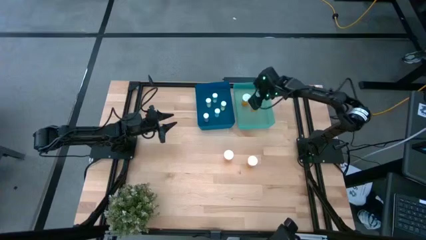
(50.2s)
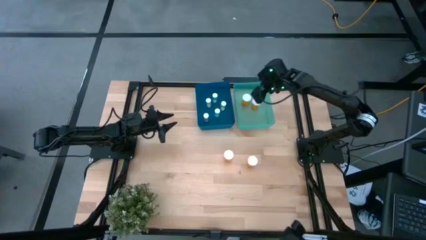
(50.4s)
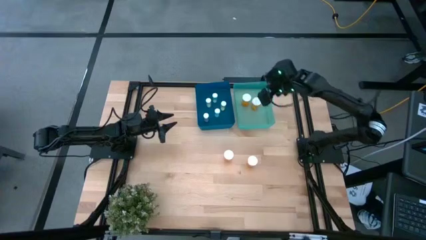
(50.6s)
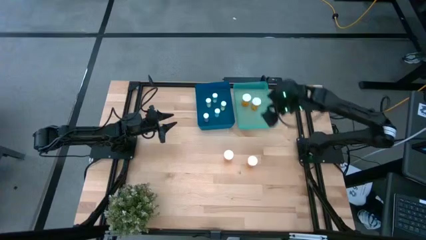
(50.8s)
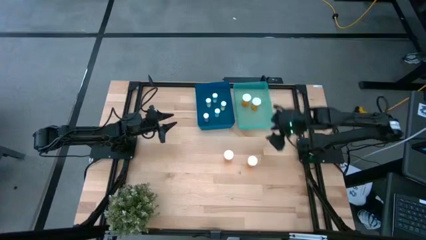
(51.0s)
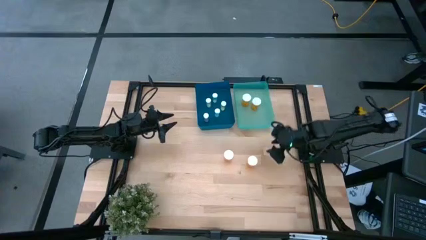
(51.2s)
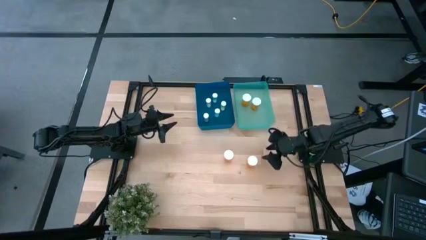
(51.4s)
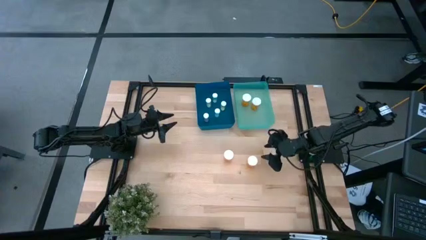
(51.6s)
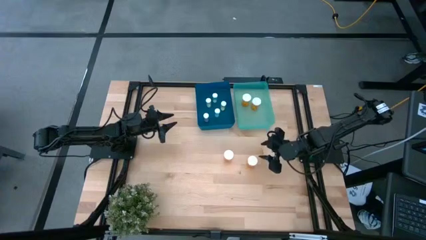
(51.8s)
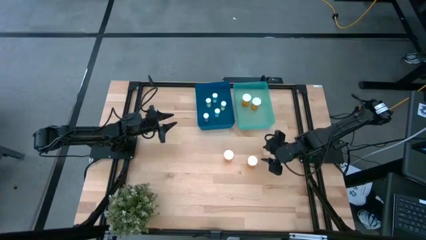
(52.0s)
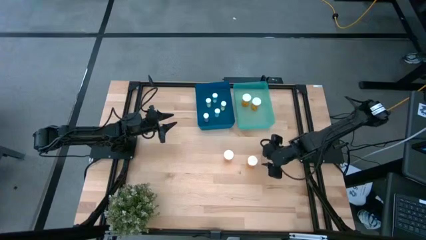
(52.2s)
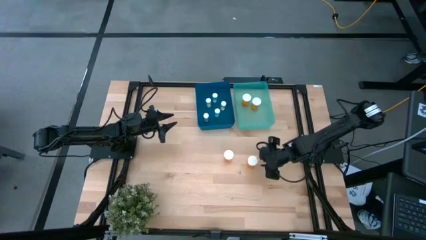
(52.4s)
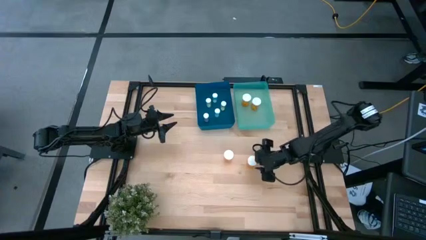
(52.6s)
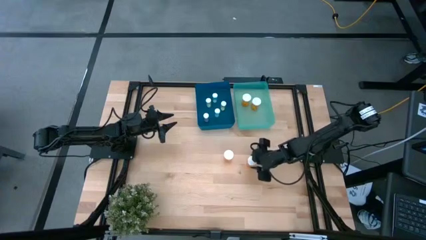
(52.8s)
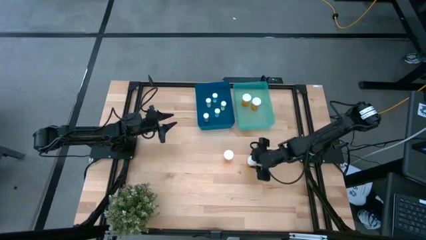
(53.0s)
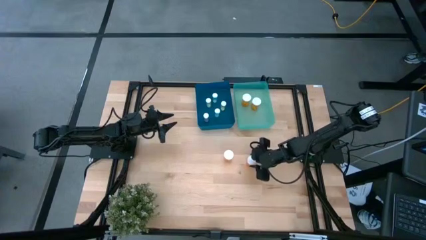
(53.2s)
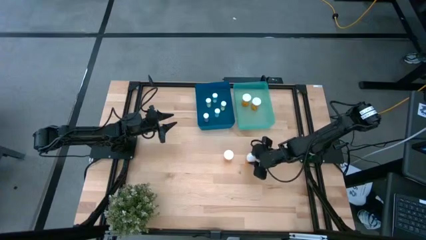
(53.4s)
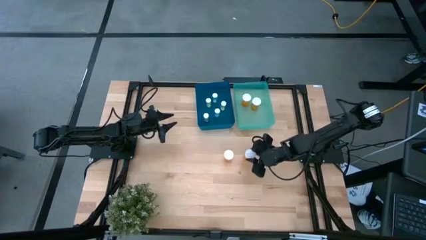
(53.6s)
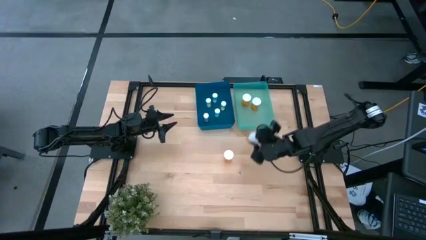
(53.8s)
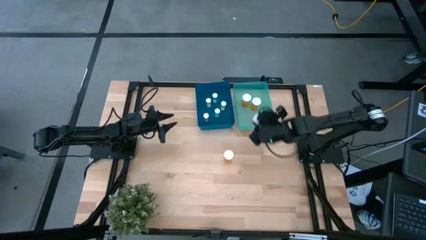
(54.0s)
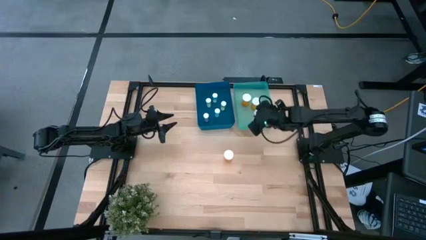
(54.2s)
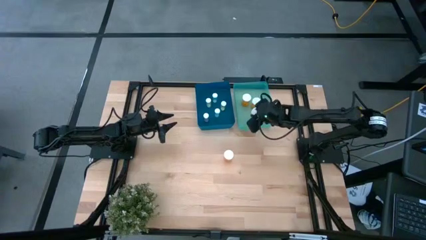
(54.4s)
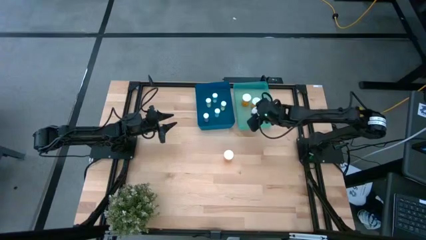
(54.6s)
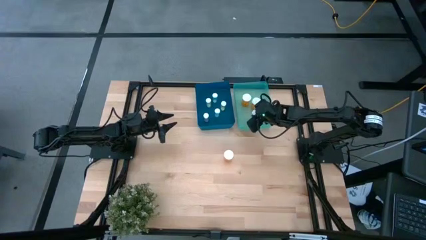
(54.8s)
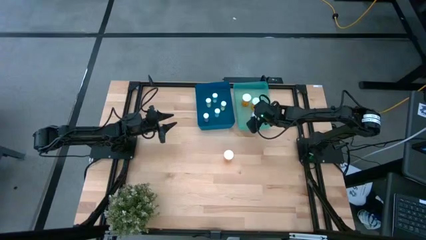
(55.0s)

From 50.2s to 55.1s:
Task: Pick and place medicine bottles into bin by pill shape (circle, oval)
Put the orange pill bottle on the green bin

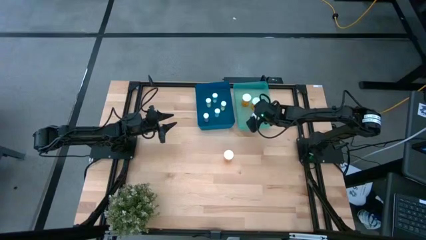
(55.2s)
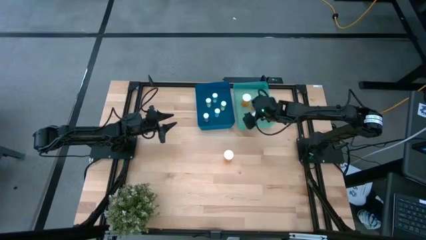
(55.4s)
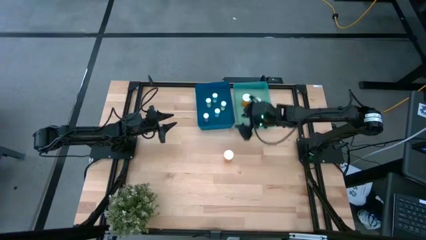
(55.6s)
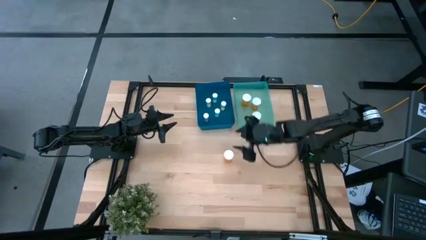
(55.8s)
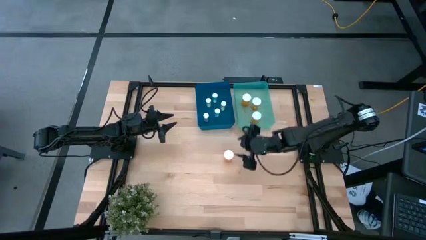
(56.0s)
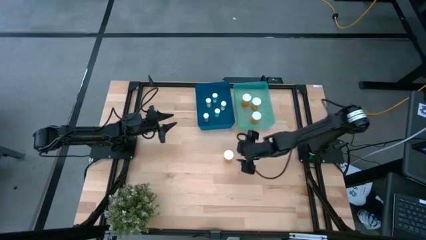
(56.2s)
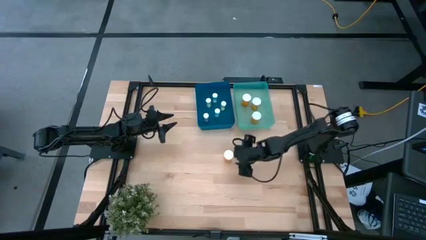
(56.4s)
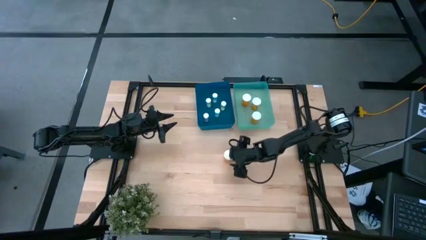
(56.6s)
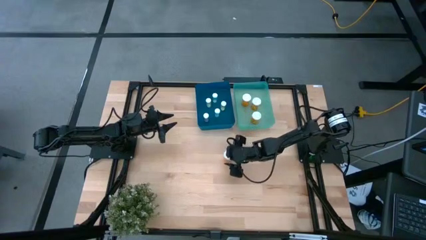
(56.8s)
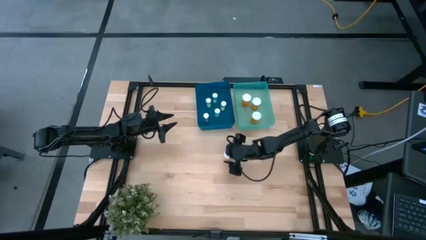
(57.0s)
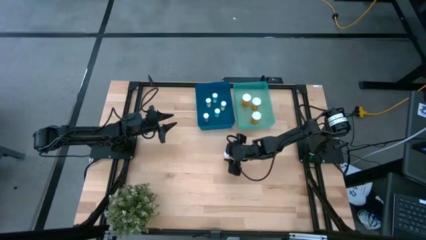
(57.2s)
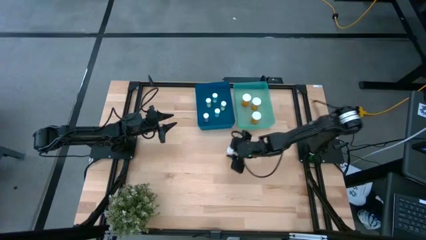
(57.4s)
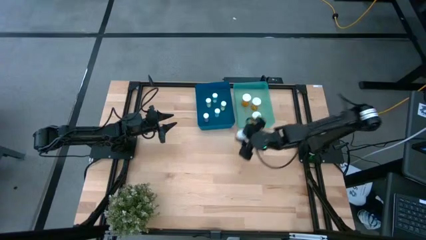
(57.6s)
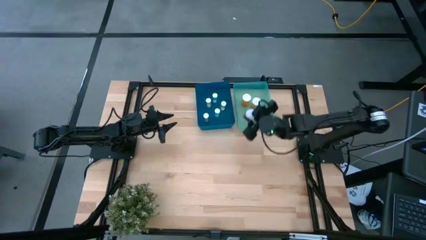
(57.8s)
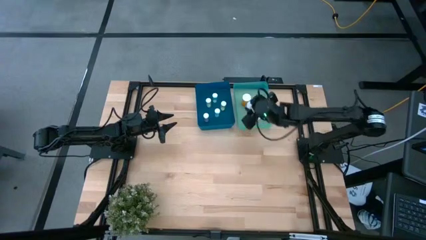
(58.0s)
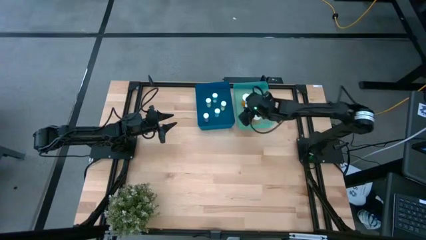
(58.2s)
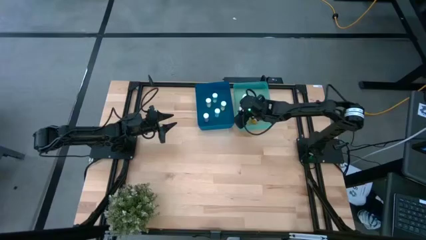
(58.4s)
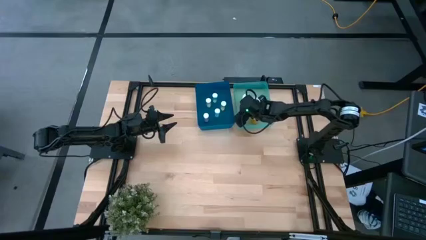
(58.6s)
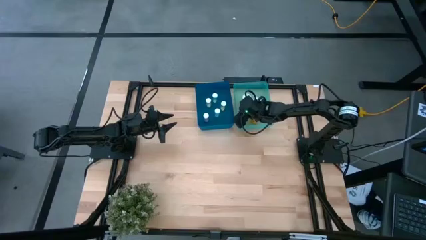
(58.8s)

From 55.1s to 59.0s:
Put the orange pill bottle on the green bin

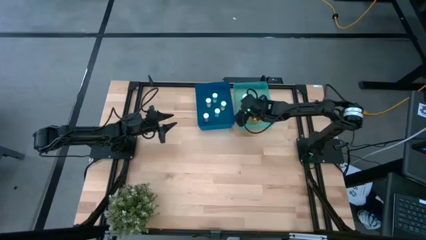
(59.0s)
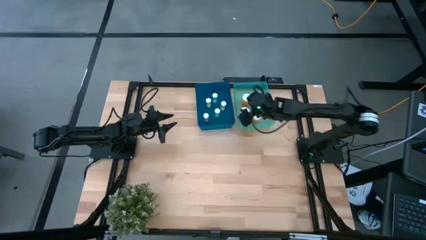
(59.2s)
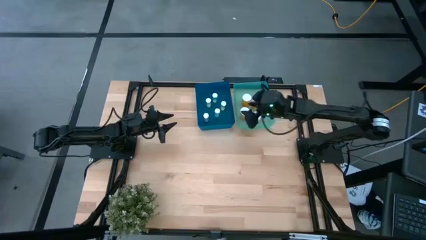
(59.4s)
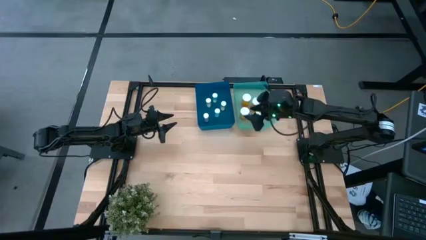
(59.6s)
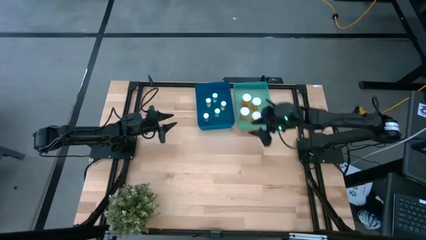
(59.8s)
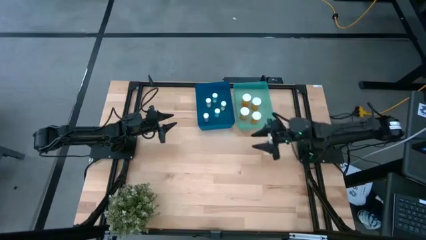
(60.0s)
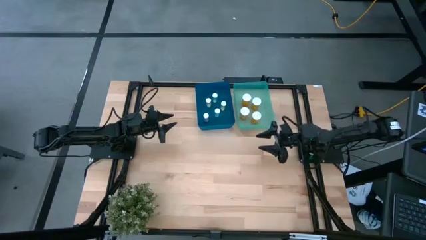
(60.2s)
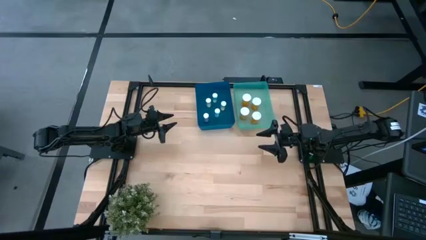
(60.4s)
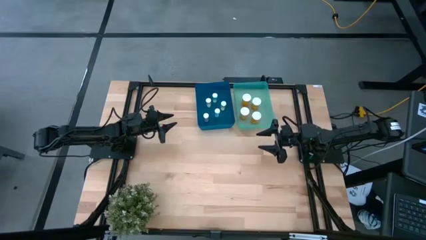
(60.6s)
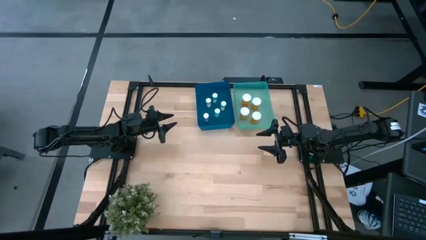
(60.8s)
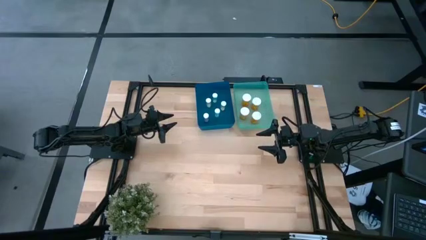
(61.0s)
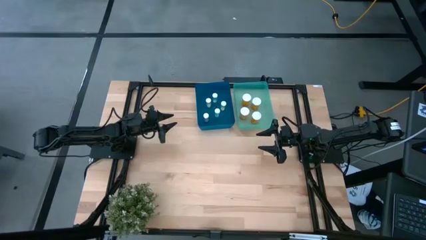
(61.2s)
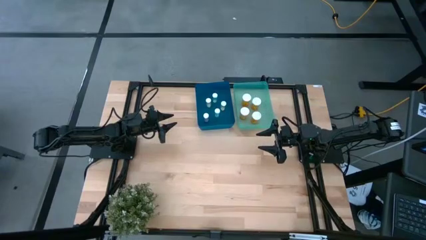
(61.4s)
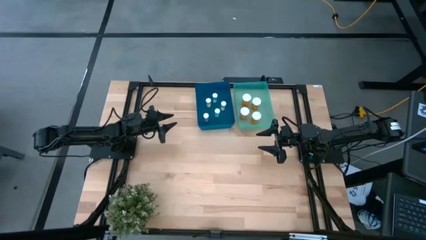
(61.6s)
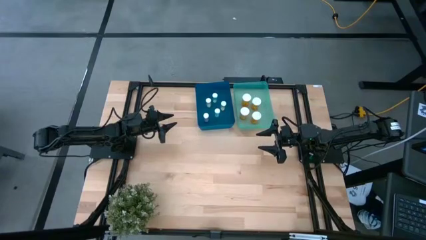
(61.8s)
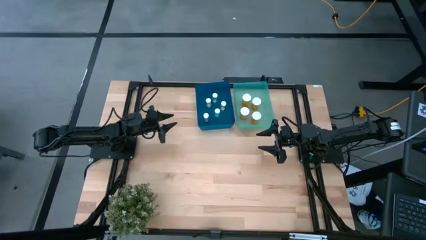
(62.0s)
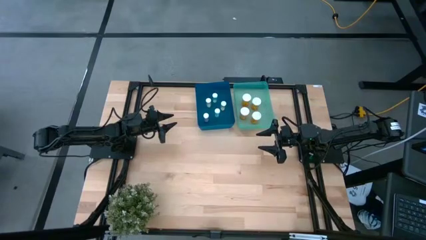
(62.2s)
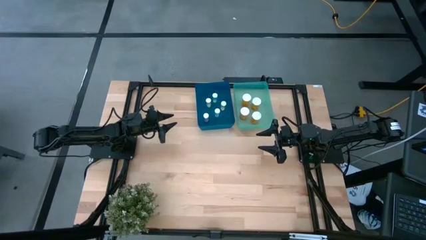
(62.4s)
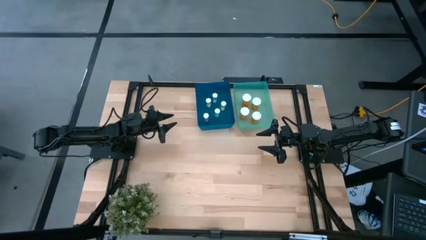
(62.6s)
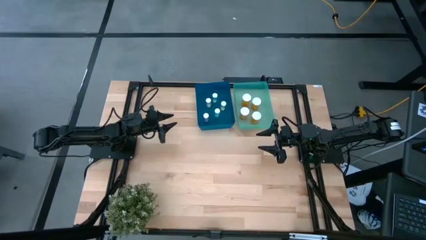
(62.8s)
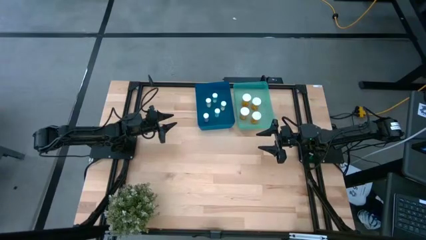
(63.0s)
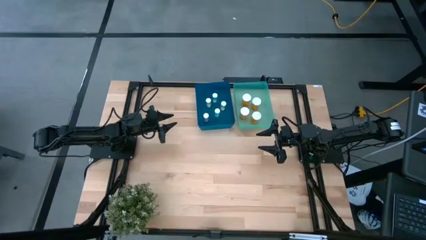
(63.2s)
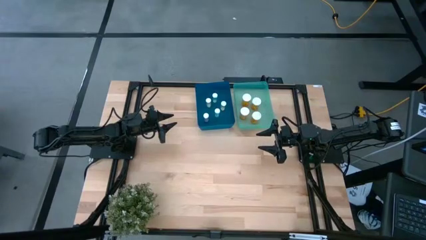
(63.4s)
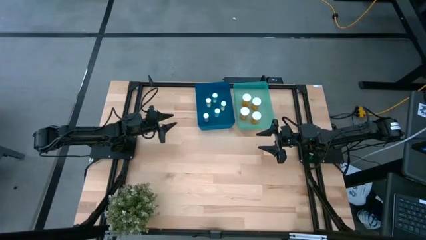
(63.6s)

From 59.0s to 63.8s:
Return to Home Position

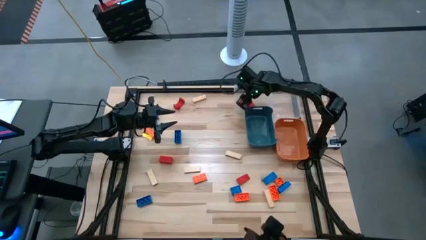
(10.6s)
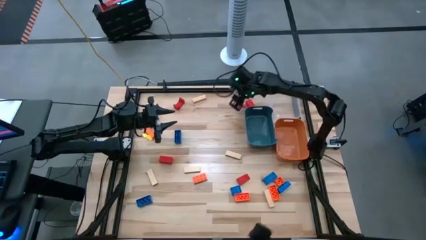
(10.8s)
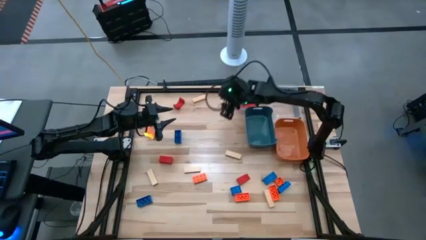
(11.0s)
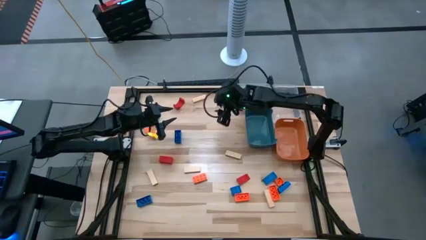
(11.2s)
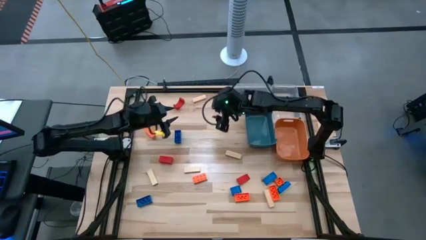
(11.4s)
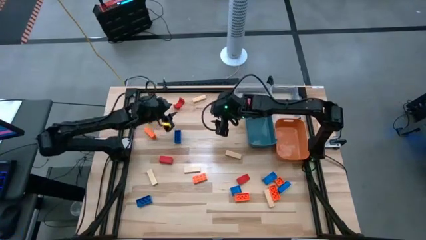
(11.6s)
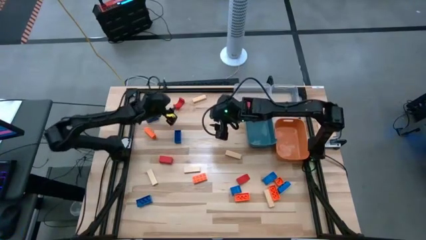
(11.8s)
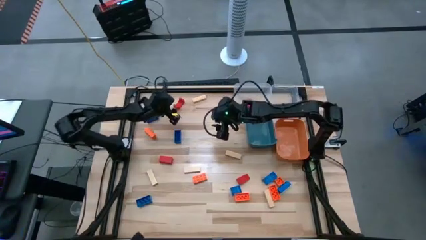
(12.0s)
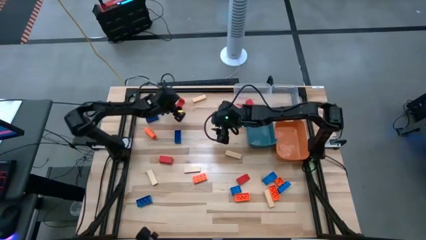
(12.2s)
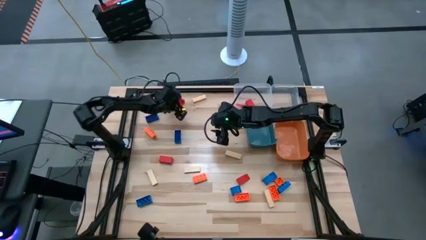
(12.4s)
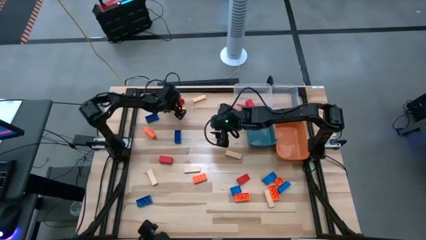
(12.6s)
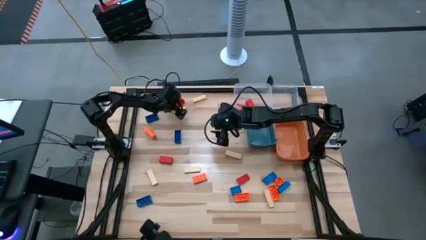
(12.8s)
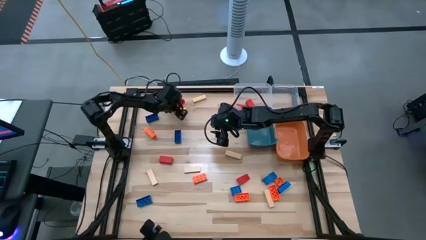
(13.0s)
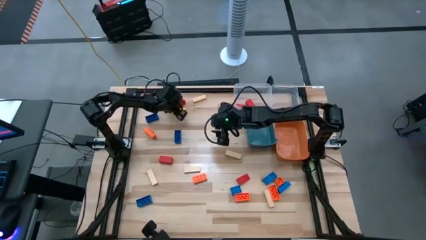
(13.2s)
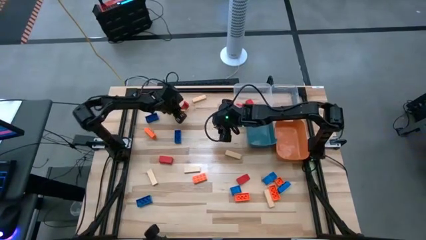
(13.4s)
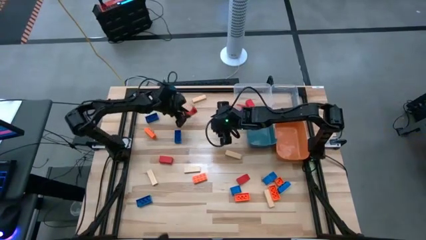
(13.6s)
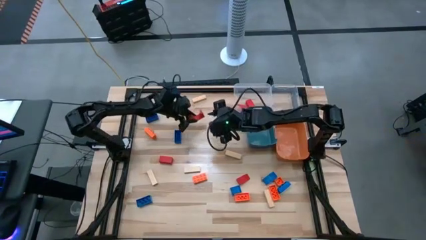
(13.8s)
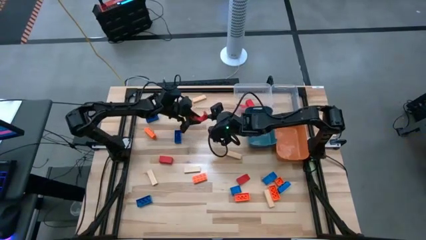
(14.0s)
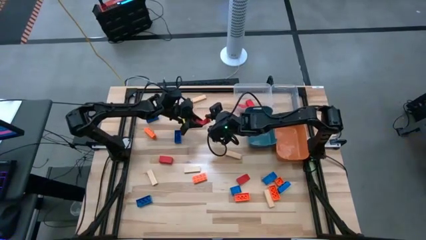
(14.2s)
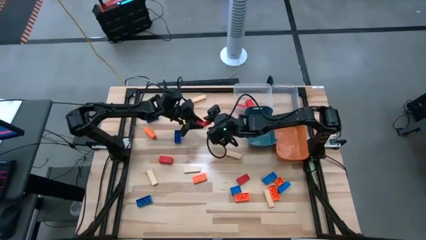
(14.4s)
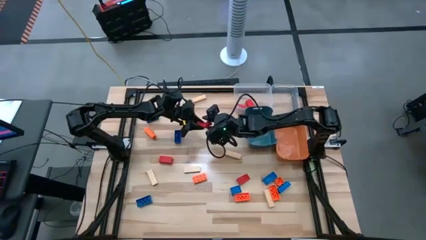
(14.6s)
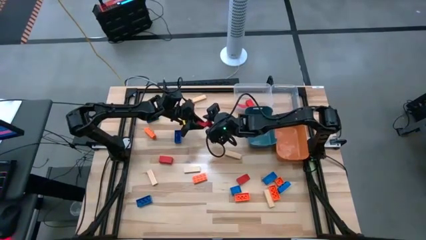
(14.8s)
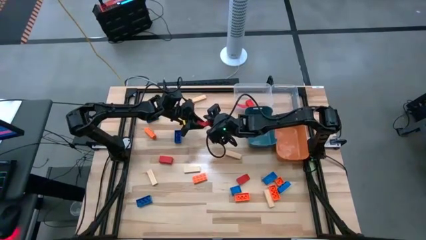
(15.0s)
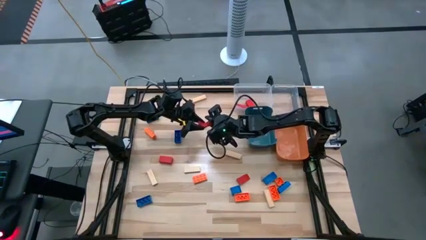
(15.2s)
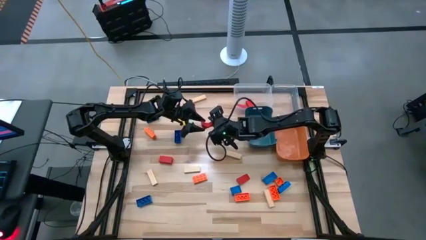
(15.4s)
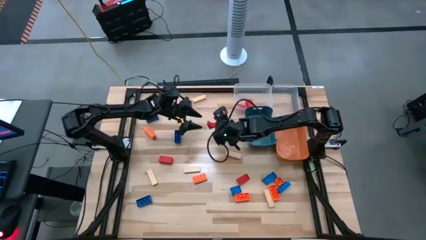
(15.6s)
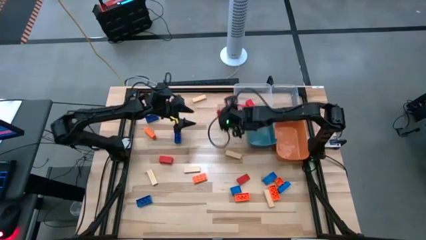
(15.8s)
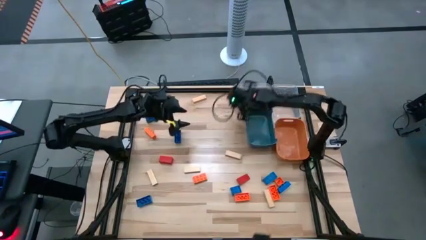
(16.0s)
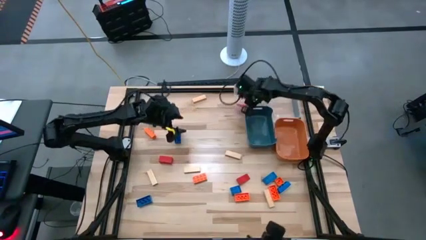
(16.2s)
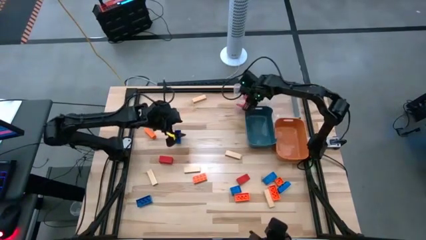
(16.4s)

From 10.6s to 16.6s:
Task: Sort blocks
Put the red block into the left transparent bin
